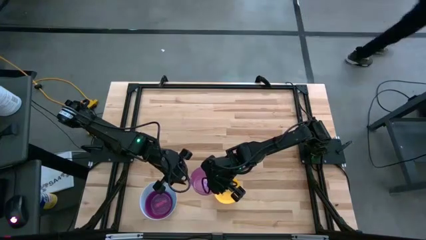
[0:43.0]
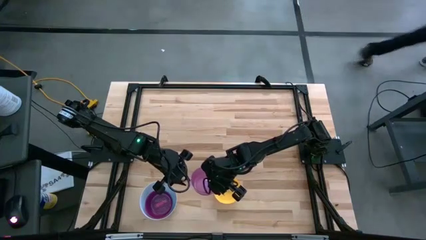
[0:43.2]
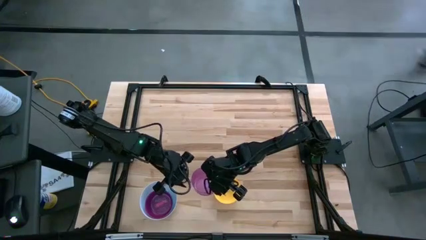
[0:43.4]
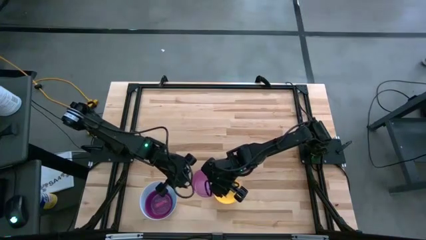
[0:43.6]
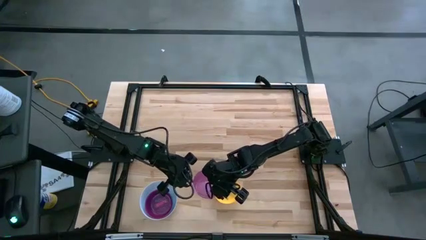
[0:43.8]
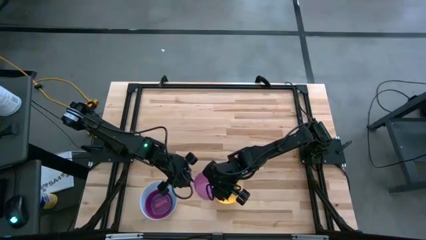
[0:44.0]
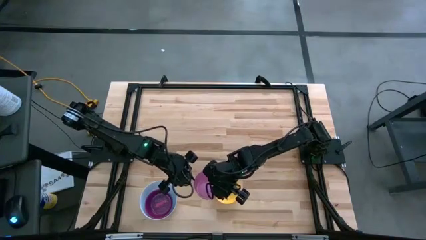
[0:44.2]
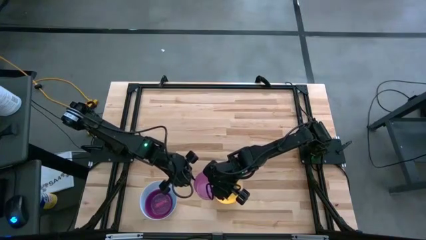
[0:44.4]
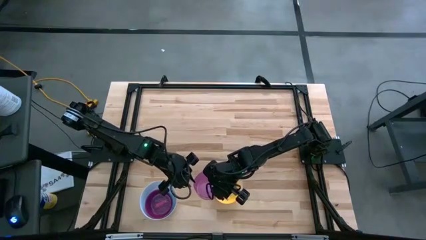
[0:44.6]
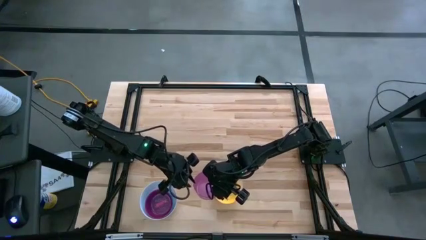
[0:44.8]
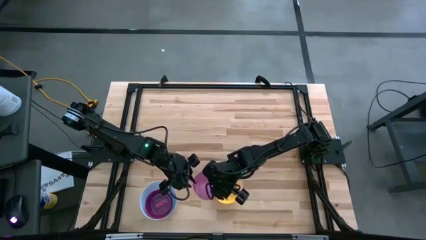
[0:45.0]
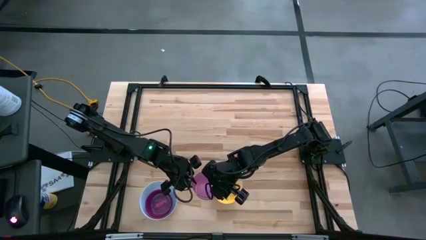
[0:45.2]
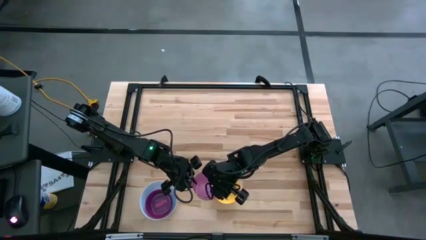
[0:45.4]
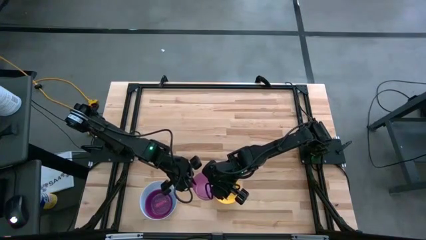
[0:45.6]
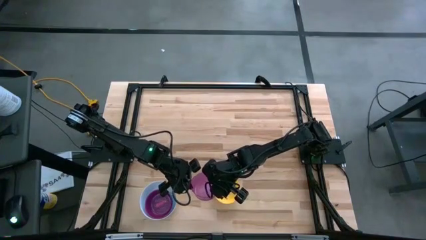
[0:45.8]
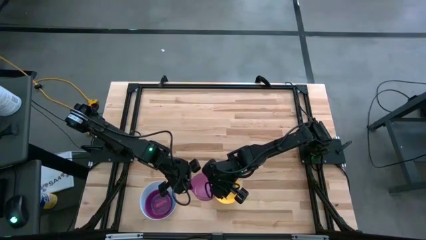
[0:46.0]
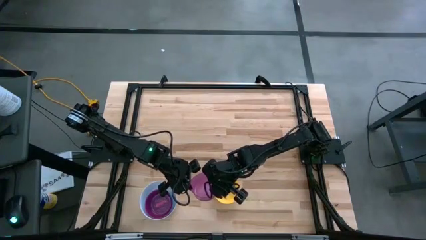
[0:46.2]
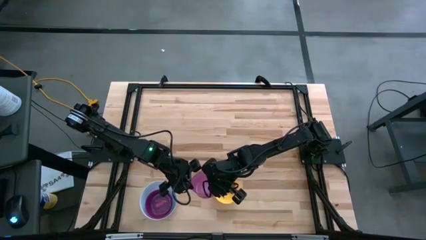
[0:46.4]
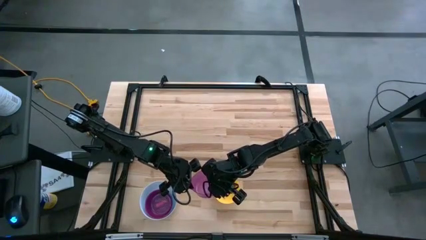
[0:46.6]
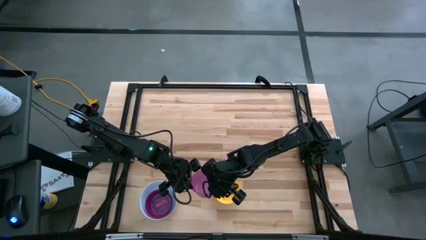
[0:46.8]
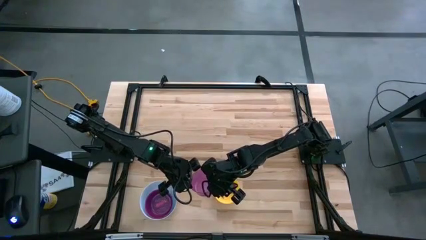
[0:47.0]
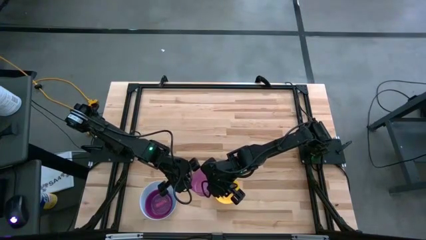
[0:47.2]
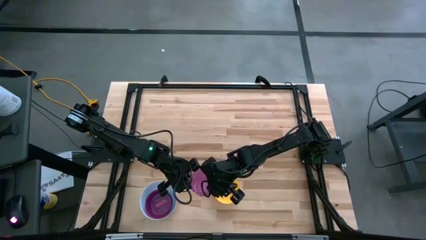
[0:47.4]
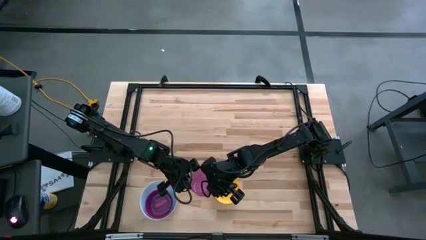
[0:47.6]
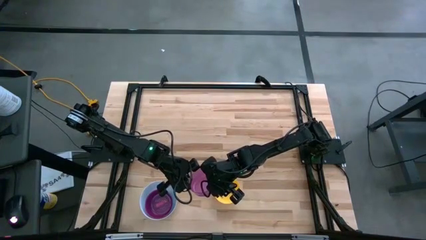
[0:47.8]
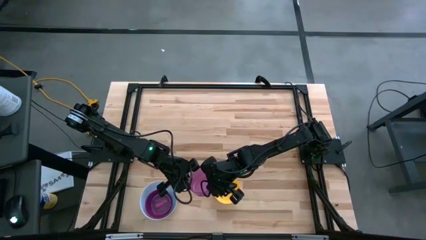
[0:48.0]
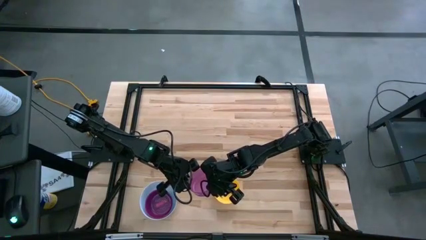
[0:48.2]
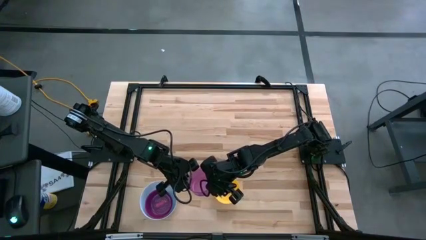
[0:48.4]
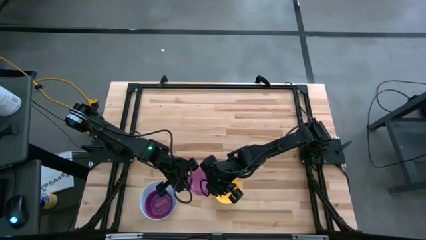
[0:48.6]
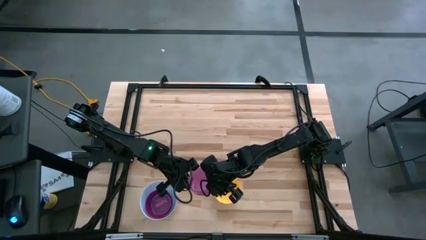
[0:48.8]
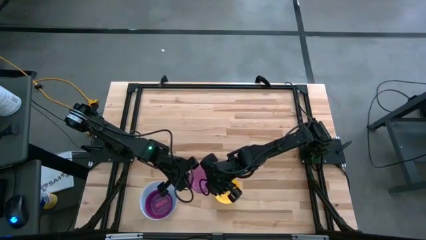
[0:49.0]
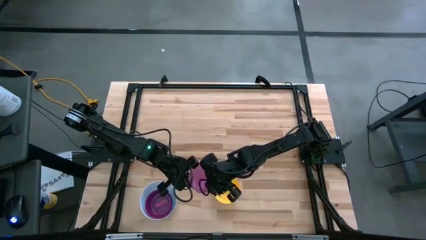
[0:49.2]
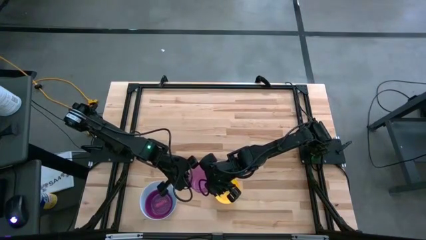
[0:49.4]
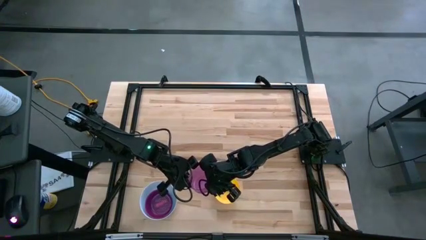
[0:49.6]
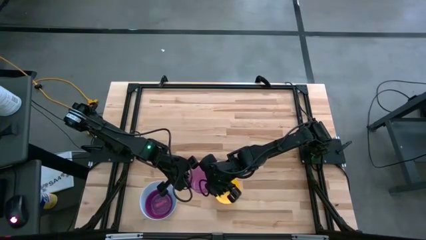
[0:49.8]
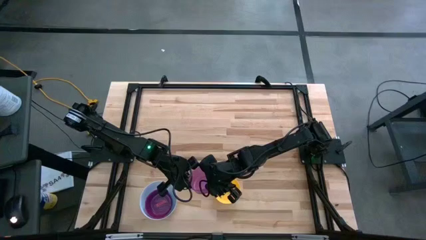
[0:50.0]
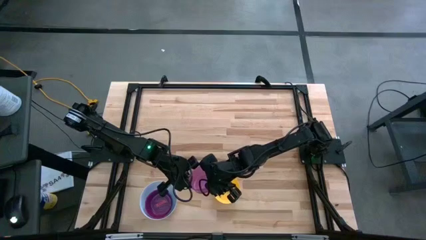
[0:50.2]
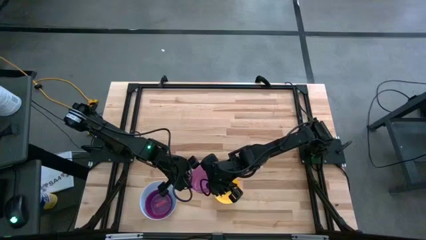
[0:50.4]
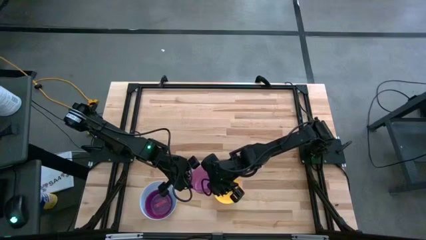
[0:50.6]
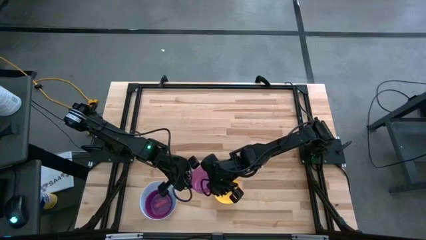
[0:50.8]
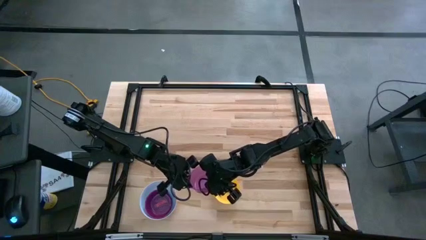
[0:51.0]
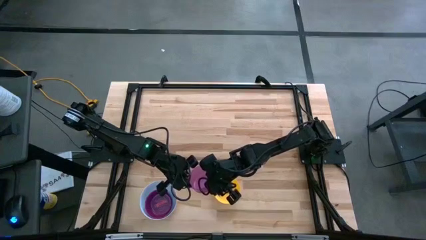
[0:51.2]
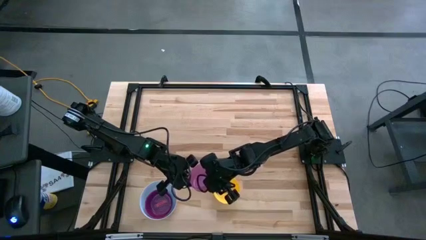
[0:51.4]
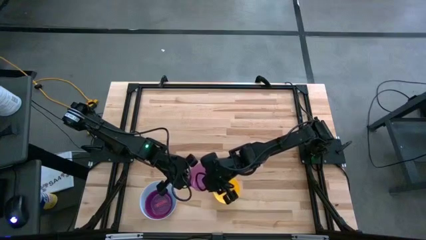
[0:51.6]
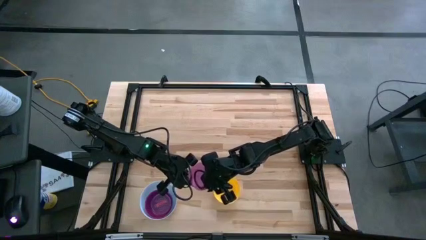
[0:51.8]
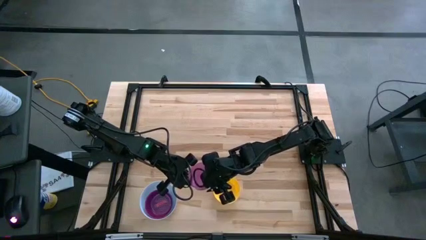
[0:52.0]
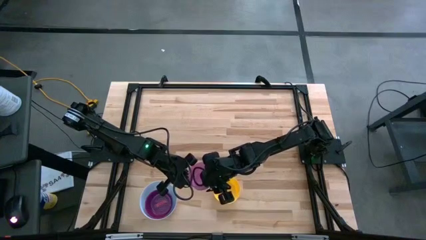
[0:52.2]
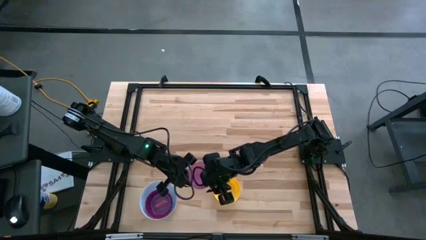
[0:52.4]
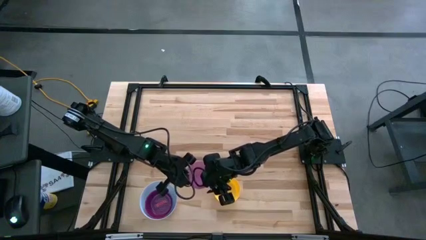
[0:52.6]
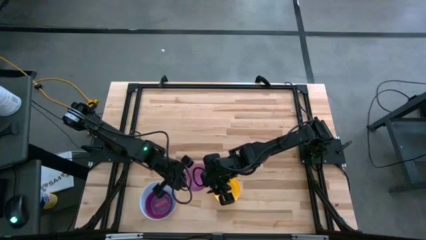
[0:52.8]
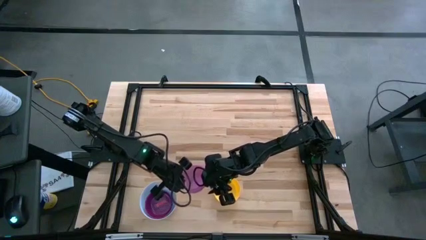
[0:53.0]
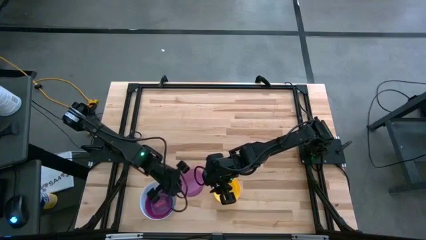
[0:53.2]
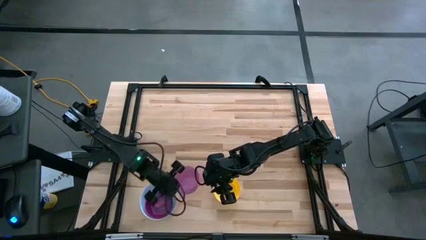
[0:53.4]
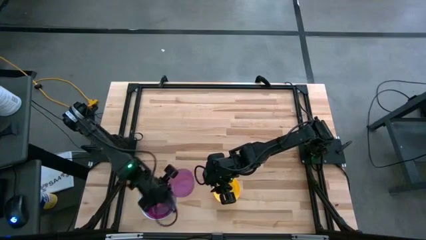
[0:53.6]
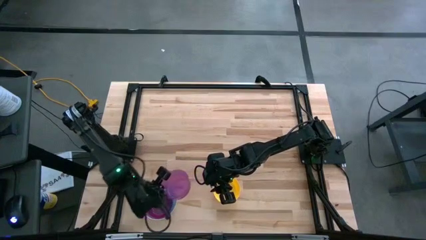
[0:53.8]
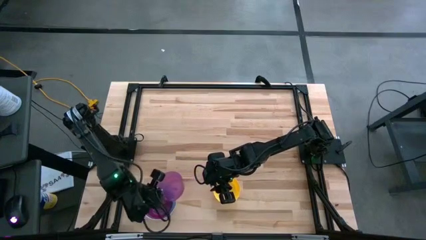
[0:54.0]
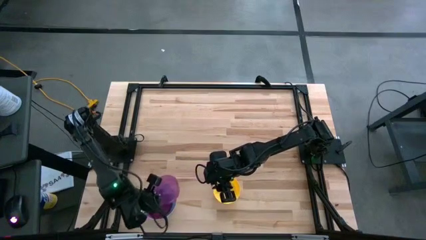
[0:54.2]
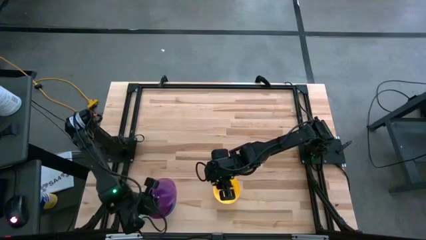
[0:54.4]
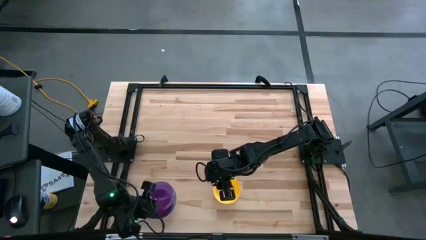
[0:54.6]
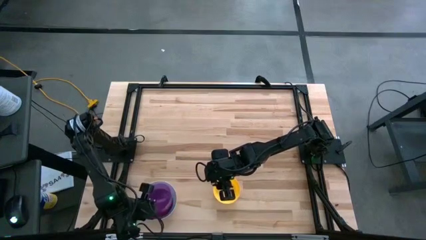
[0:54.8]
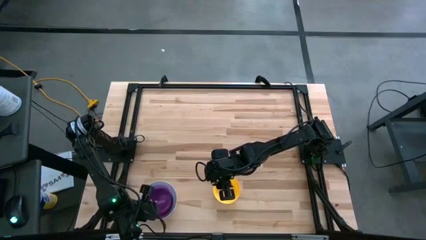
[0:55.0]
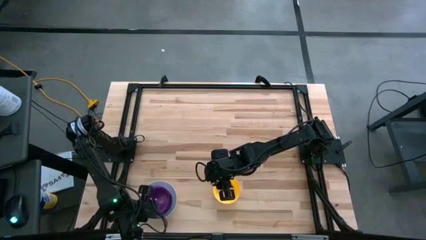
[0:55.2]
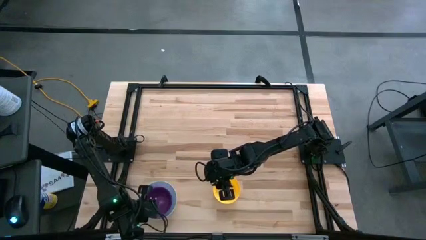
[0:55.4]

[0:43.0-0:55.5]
Stack the purple bowl on the pink bowl
